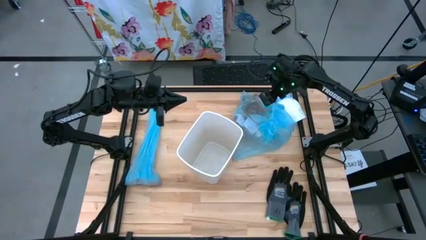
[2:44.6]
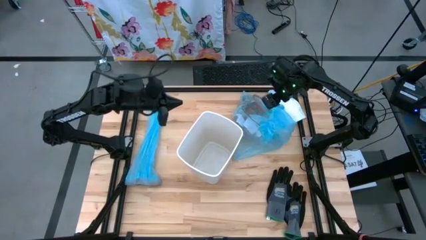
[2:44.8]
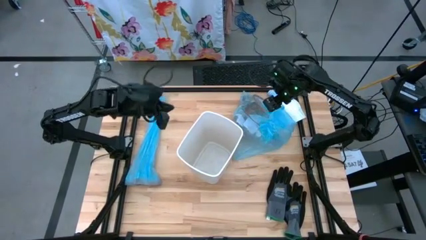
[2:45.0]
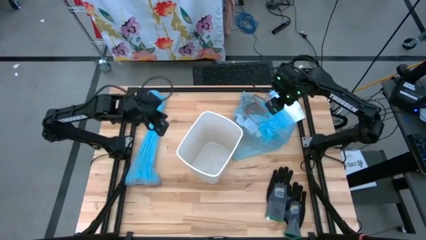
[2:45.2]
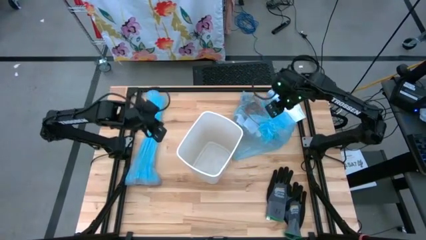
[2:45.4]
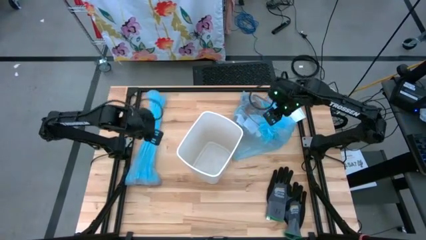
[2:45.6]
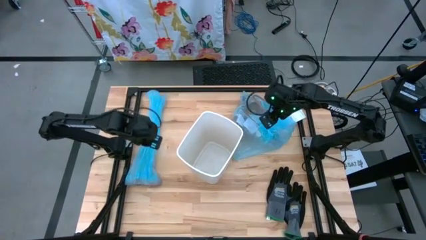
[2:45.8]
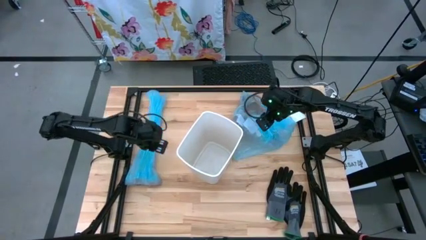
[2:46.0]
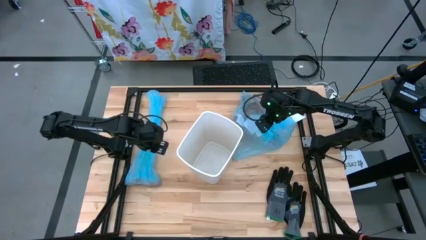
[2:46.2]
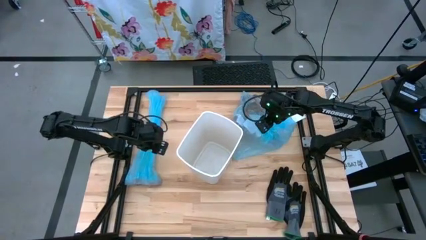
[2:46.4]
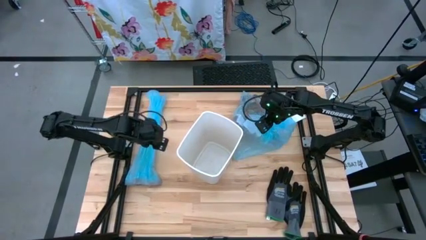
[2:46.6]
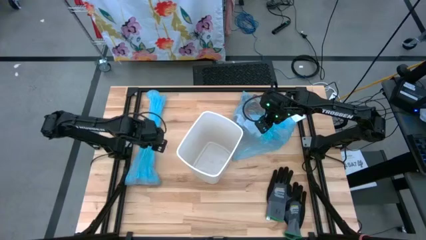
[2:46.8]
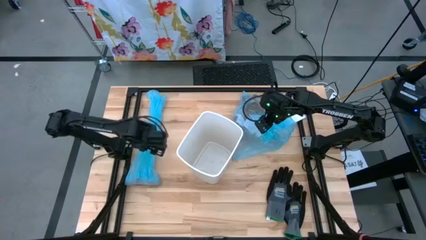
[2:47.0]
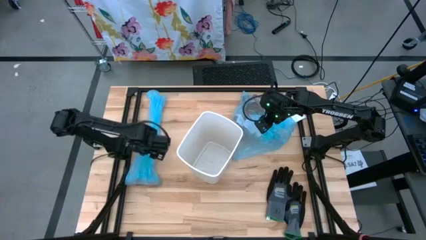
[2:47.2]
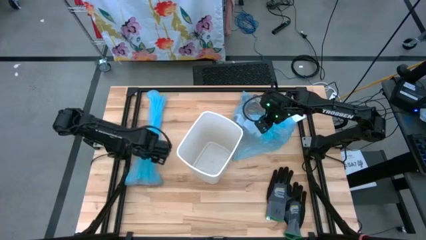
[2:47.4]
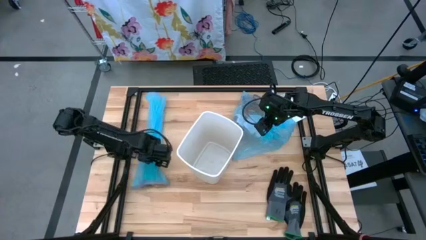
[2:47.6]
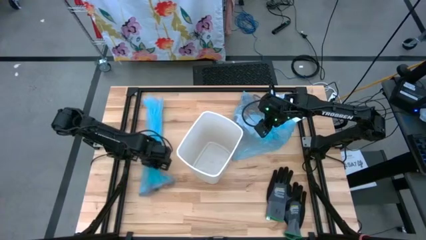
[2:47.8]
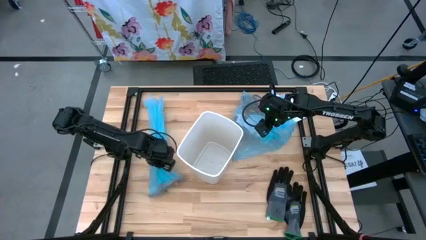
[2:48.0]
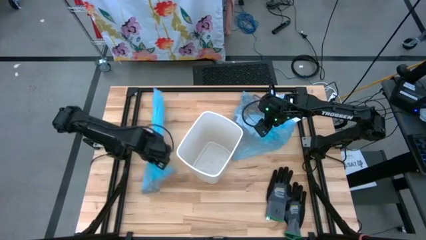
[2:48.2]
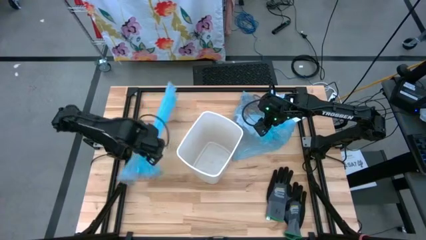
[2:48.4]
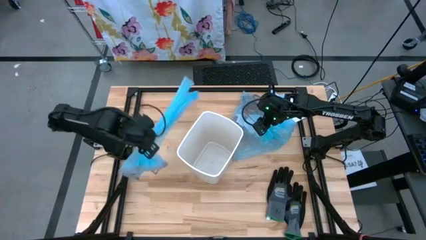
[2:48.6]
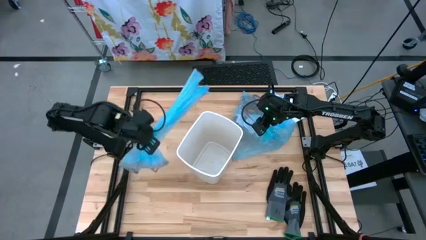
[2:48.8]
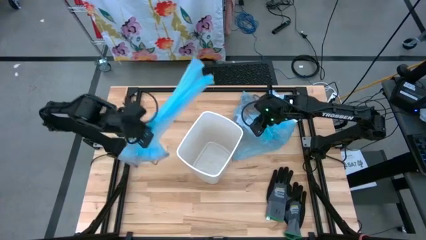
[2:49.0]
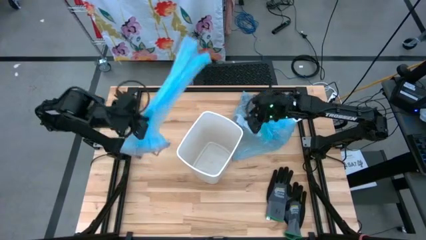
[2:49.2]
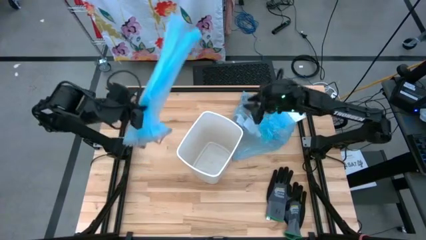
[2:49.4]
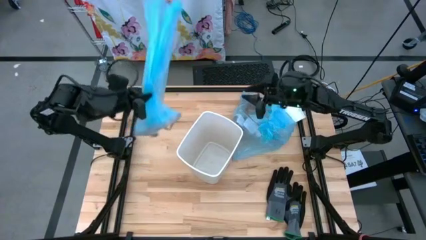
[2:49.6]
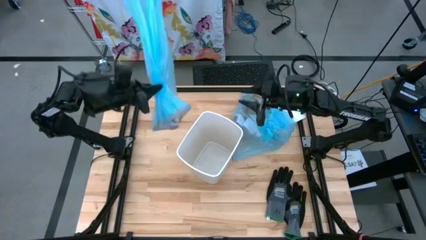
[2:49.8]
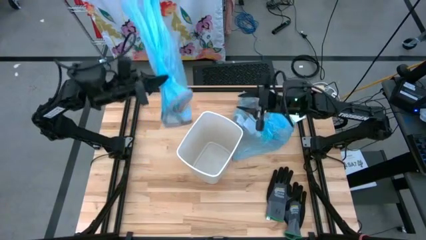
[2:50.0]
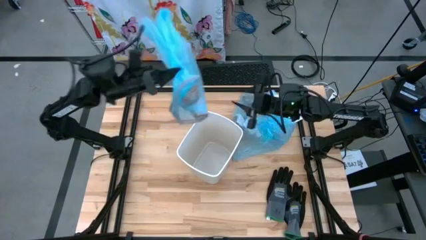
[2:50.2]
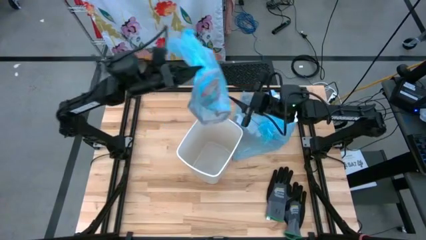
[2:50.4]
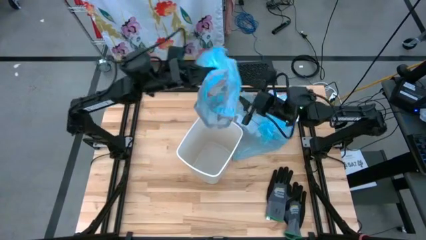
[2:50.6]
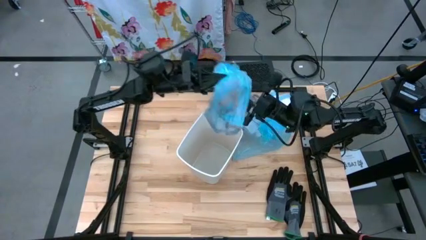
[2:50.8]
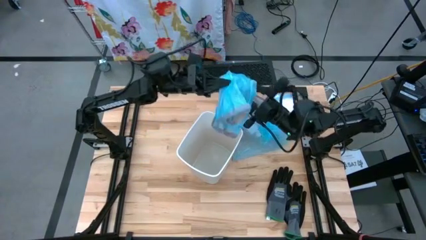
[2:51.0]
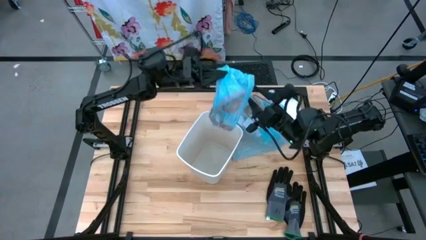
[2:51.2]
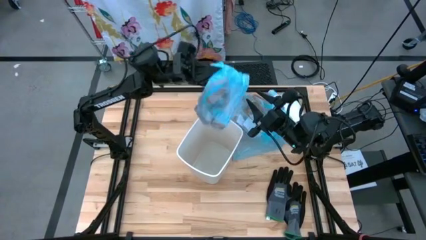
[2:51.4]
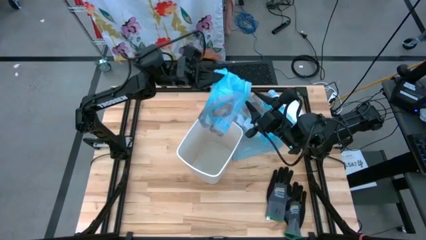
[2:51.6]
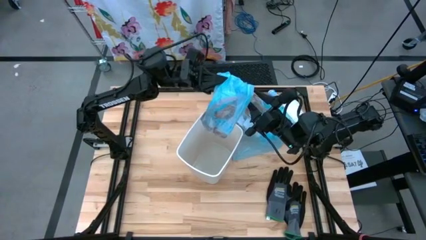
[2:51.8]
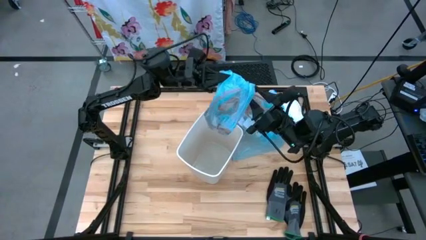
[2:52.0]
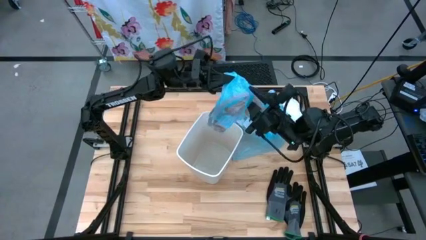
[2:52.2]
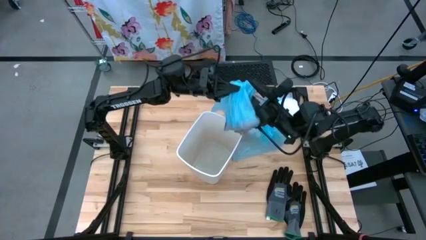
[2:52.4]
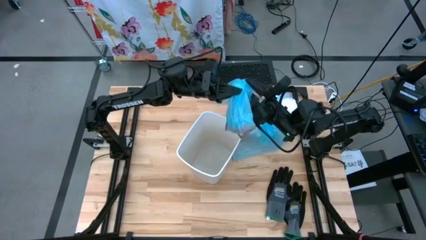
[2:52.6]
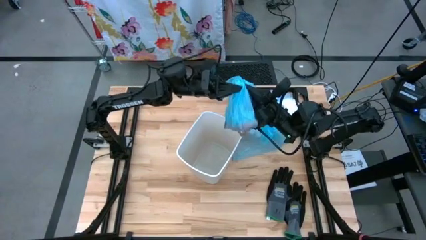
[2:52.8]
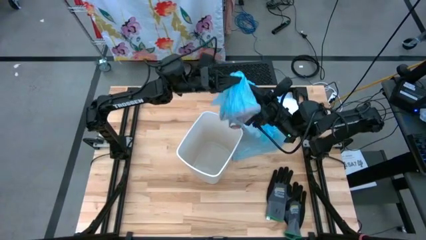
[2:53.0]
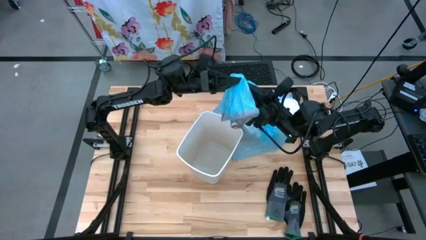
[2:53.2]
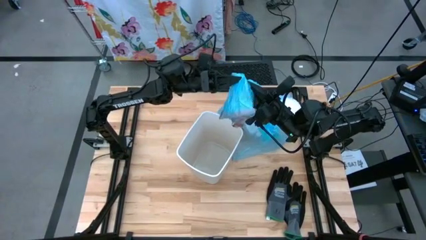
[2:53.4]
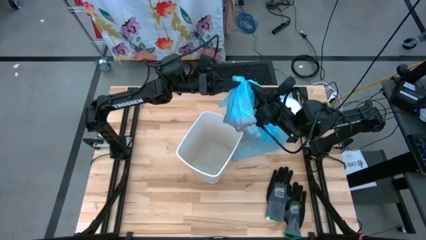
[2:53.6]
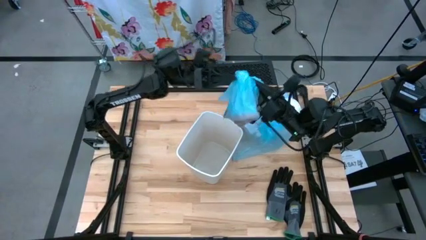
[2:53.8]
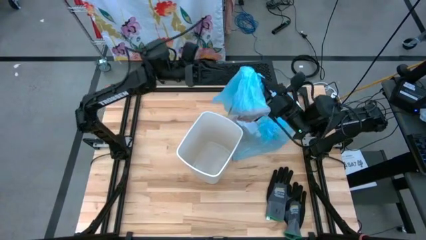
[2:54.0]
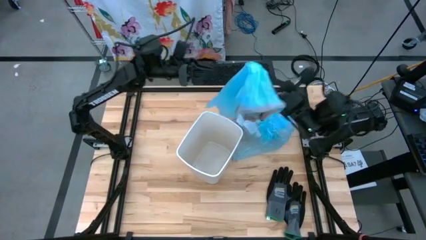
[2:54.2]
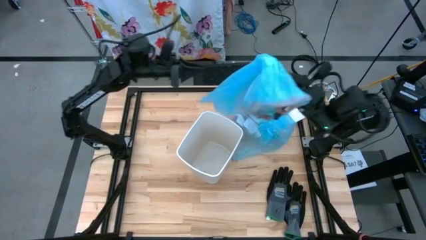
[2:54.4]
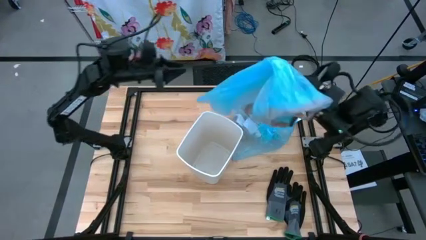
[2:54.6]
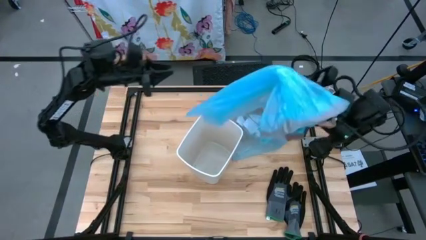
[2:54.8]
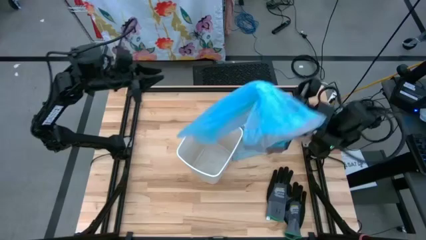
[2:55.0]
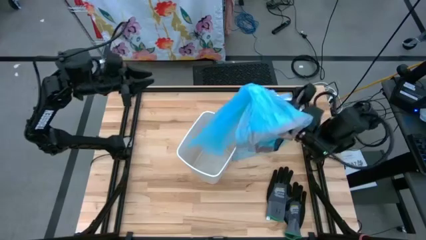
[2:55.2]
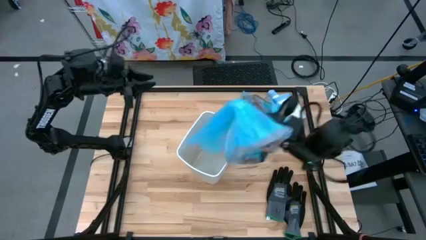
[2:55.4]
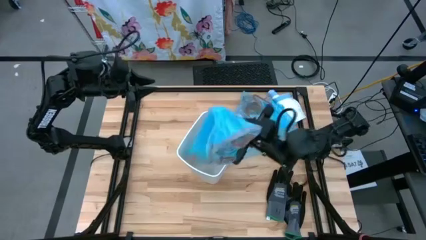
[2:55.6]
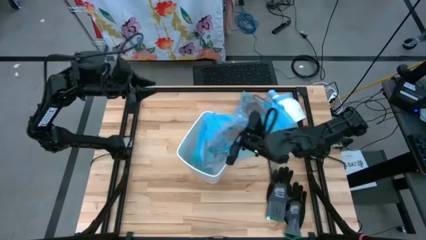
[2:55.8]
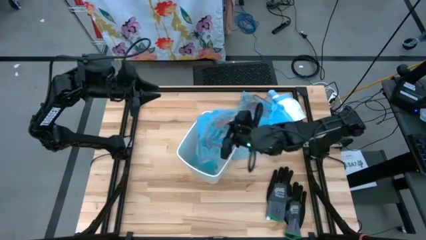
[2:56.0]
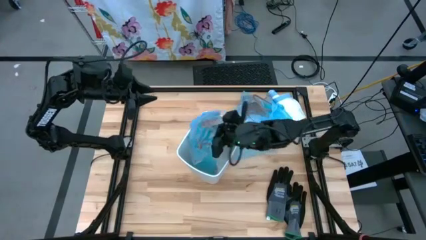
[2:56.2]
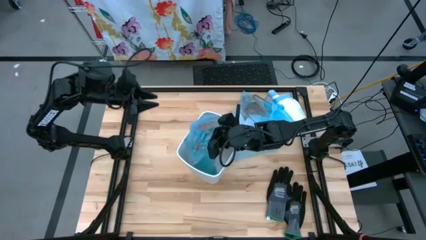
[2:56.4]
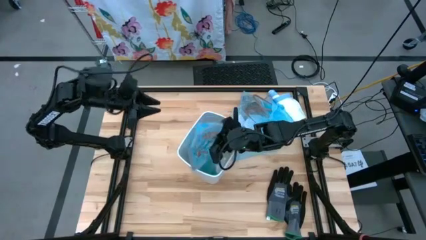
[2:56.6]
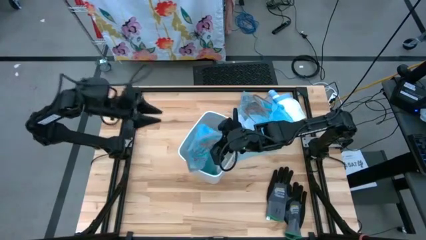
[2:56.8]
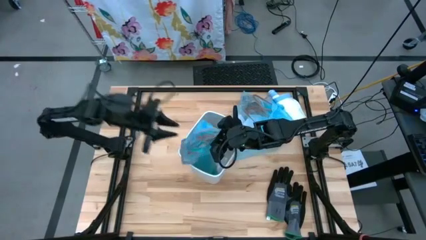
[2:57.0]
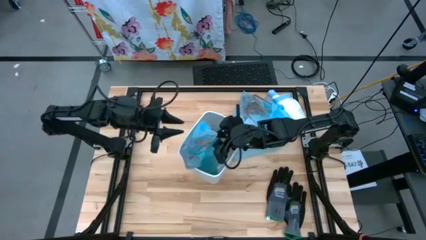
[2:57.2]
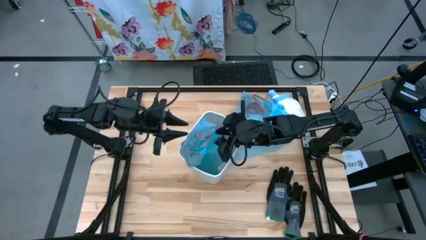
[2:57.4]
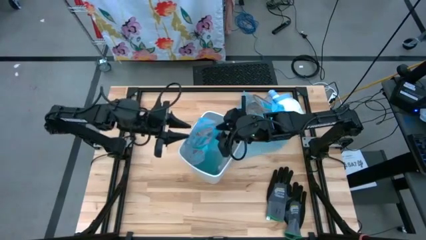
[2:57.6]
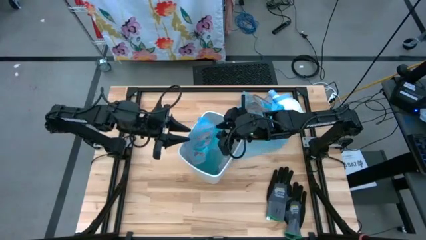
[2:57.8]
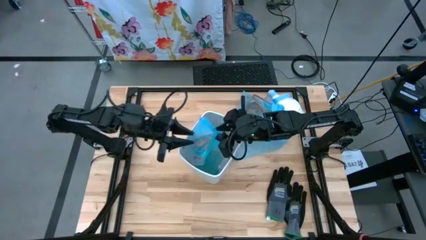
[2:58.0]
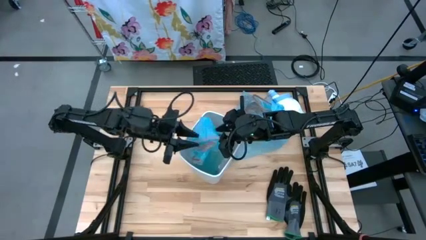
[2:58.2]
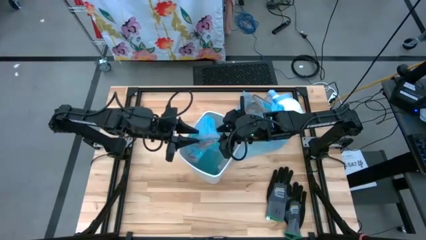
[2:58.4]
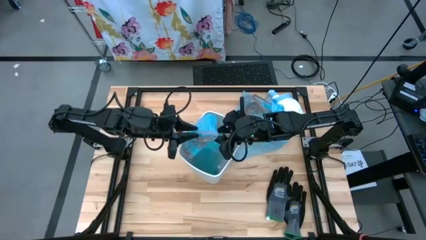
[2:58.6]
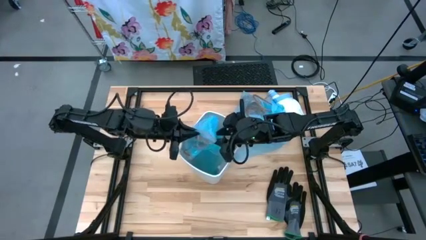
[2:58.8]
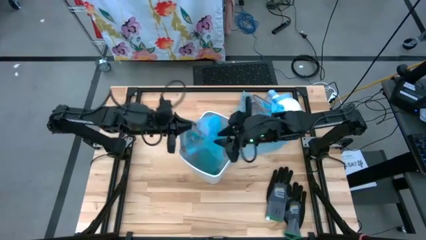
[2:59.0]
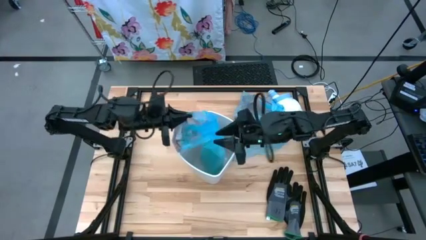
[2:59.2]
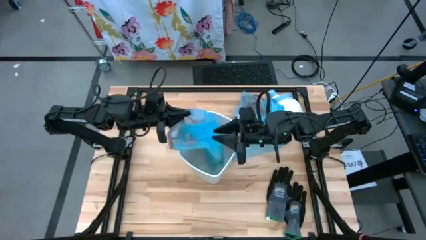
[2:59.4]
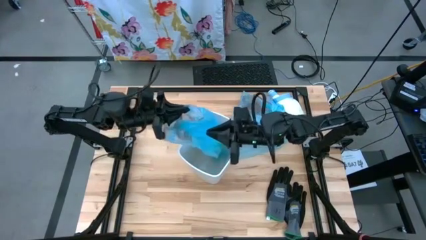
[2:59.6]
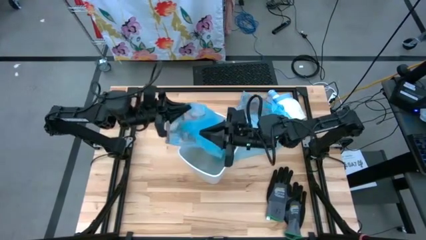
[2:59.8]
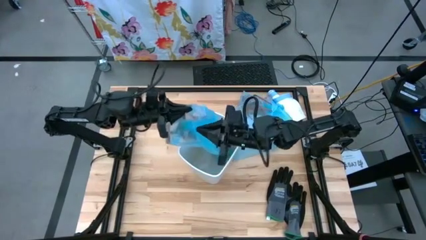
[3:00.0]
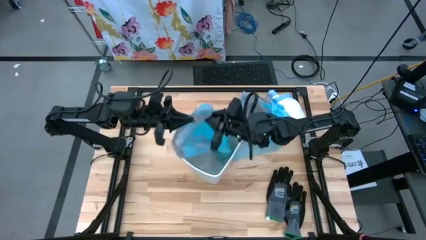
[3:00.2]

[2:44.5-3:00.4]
Task: place trash/remove bag and relplace
Insert the new blue trash bag into the white trash bin
